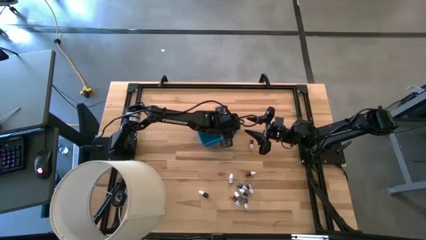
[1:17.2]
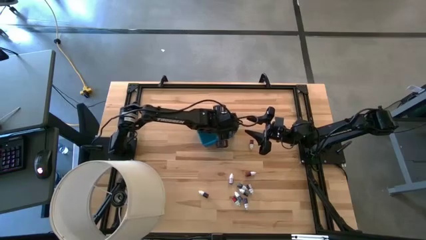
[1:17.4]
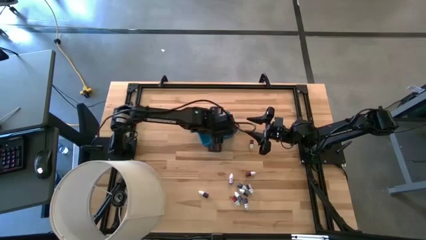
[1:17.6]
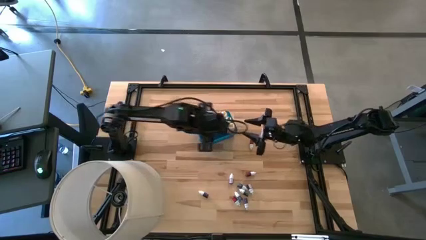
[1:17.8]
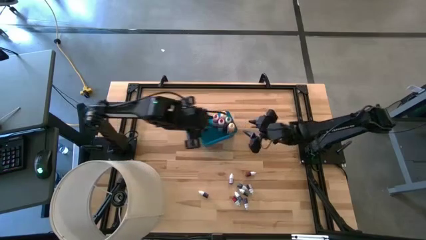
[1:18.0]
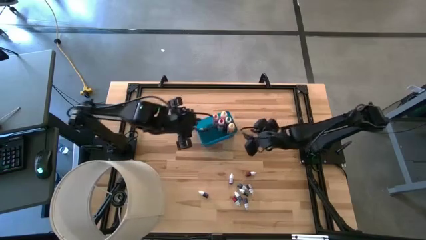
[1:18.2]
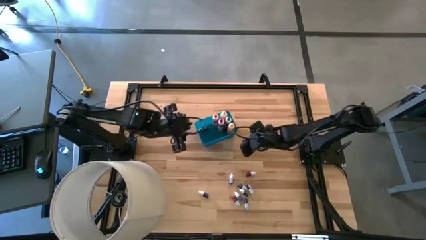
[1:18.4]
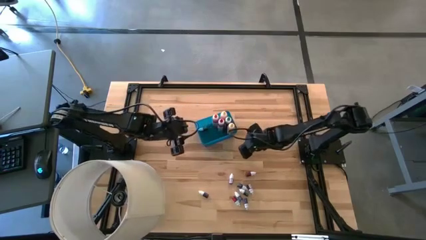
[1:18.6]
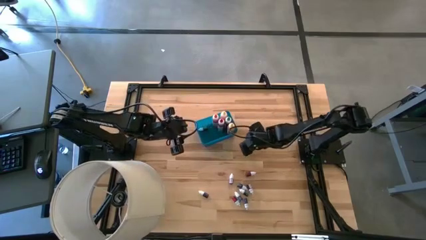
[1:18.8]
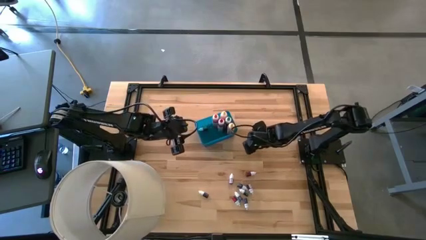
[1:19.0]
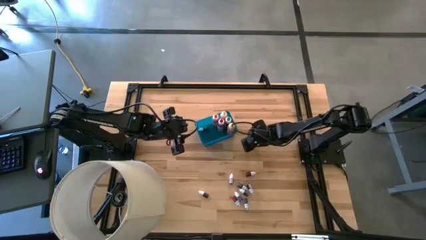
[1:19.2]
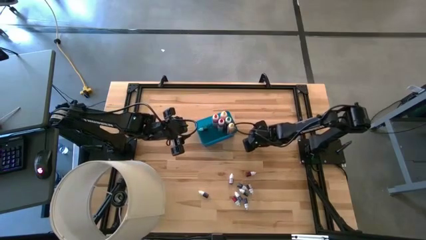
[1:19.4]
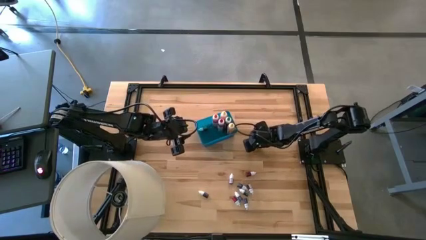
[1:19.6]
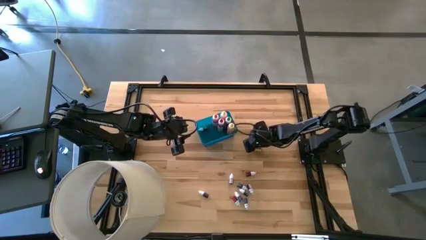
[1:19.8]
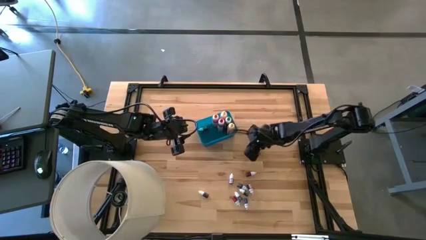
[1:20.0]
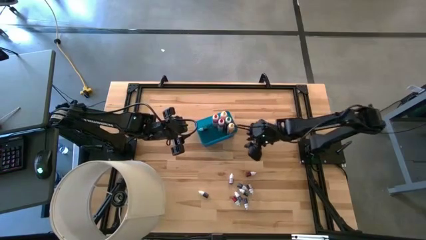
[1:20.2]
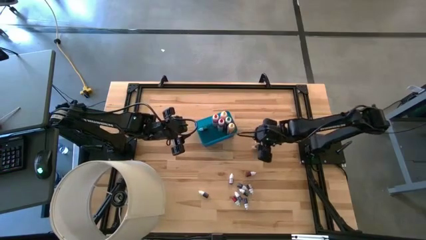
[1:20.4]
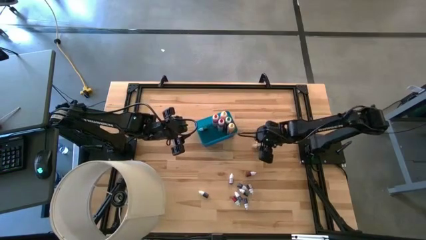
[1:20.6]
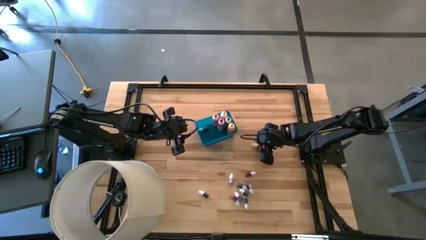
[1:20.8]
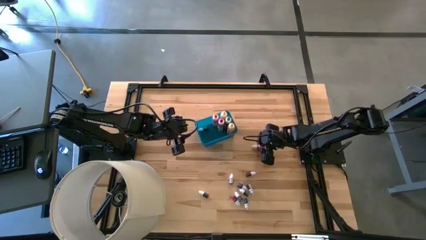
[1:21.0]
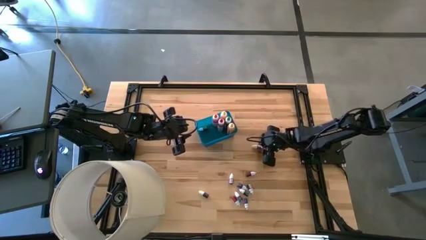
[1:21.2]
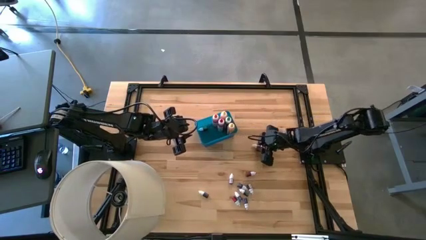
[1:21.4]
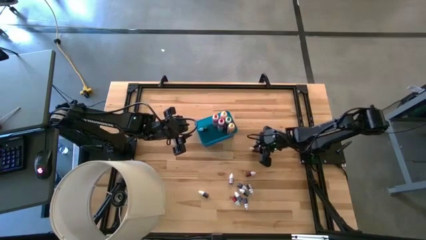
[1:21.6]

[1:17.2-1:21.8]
Task: Pick & Place food coloring
Put the top small red food coloring bottle into the bin

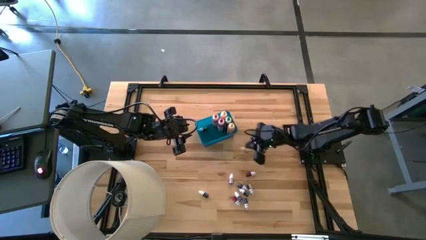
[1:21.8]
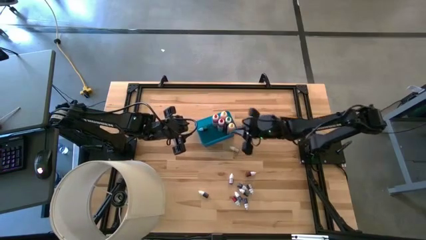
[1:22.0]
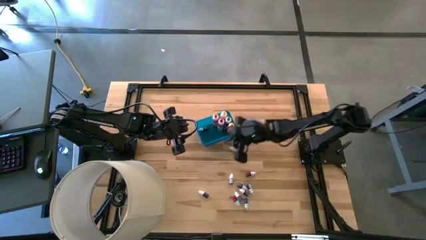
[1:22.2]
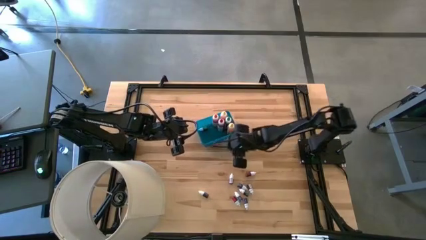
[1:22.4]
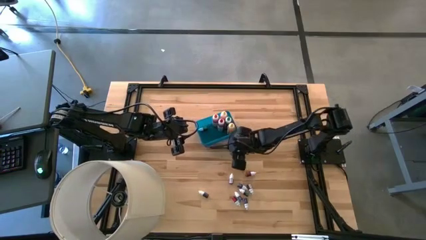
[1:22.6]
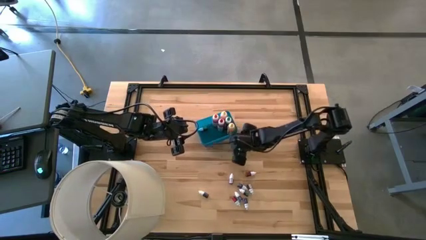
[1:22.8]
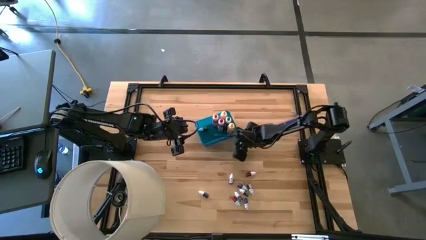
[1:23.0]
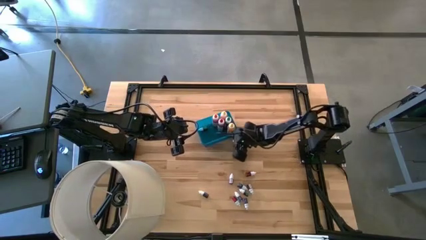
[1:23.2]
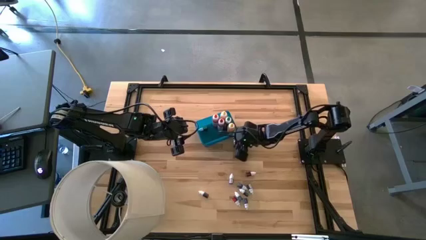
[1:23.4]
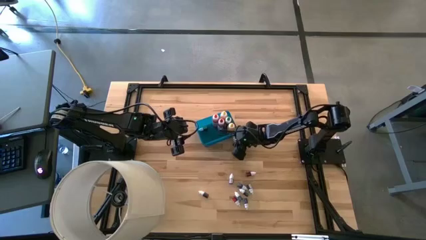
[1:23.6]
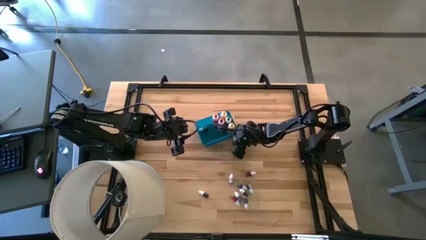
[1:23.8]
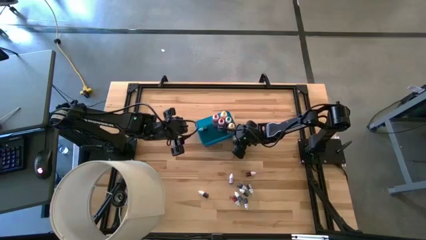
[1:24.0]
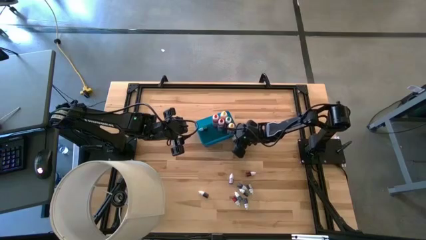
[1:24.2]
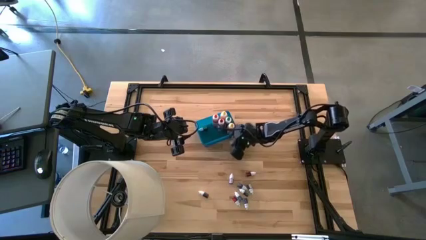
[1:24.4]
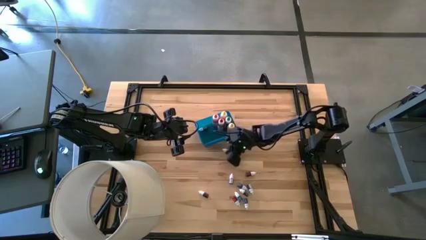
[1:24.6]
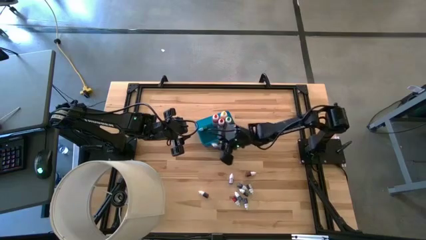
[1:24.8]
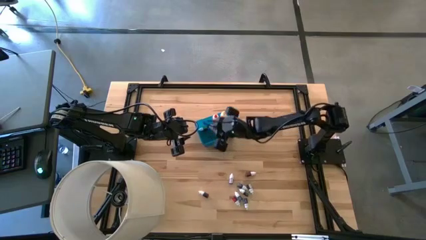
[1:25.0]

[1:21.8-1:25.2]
Put the top small red food coloring bottle into the bin

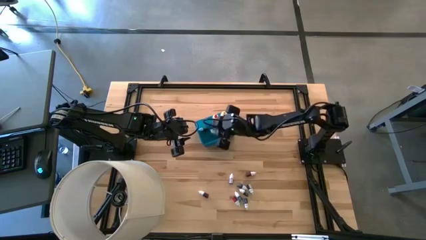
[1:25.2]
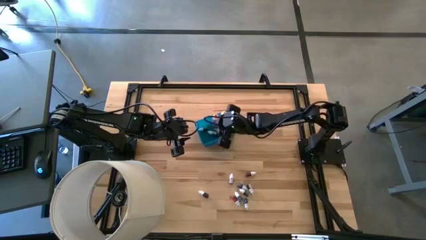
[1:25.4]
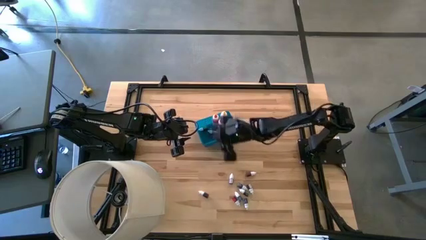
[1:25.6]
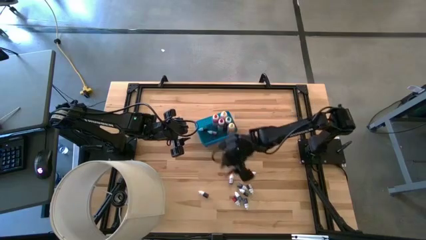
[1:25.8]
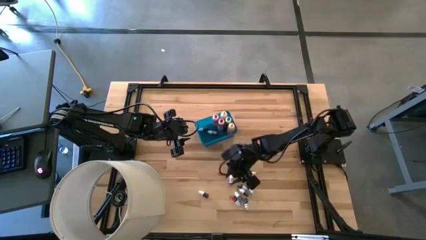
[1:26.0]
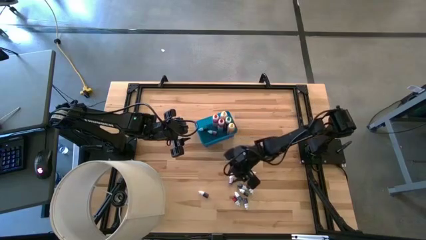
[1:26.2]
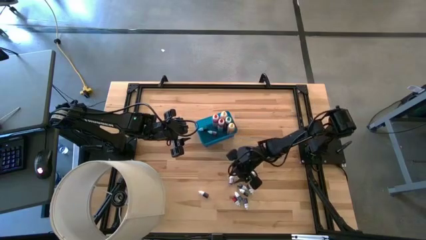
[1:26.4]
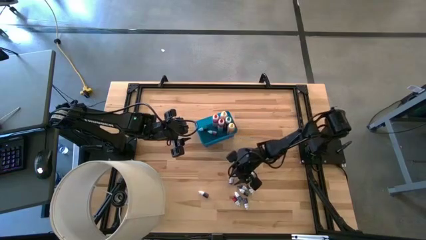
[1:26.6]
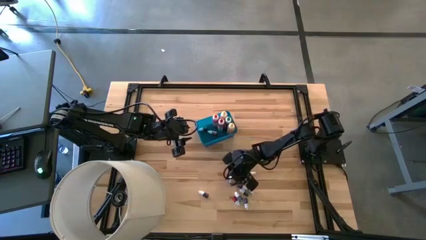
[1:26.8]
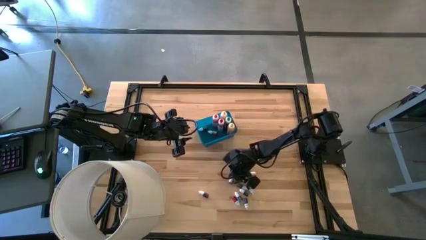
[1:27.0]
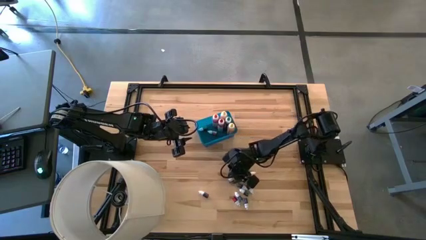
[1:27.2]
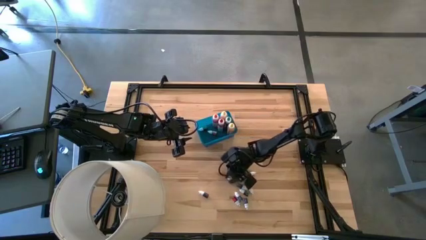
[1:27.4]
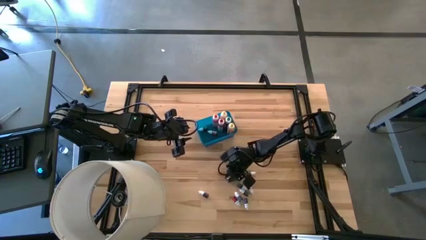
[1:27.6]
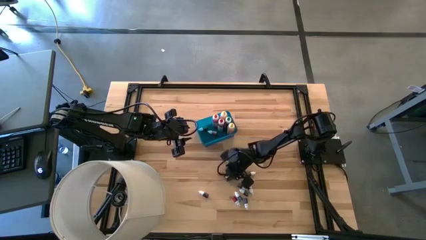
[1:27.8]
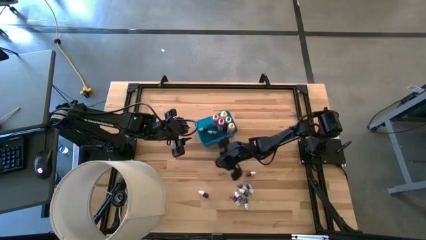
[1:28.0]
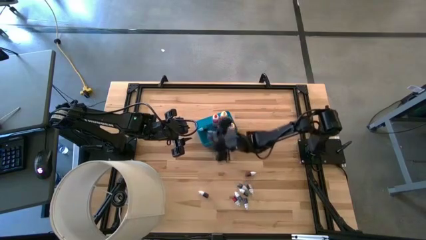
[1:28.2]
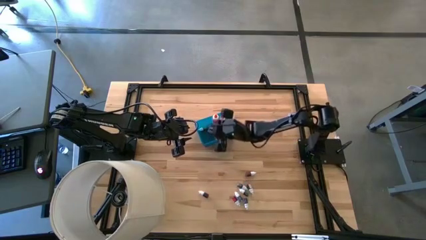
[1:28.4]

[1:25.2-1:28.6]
Put the top small purple food coloring bottle into the bin

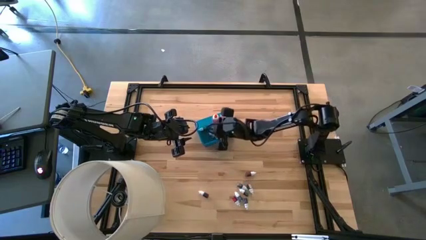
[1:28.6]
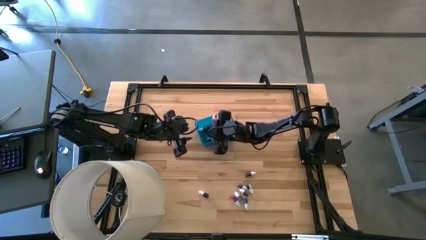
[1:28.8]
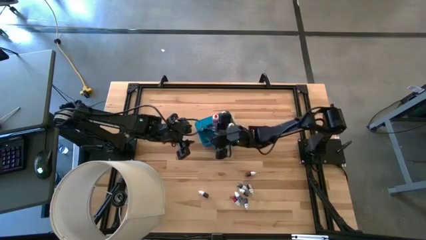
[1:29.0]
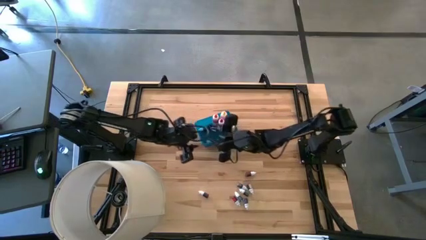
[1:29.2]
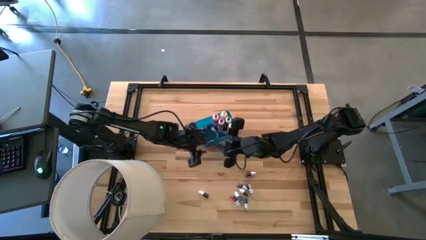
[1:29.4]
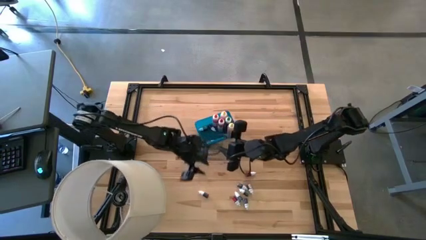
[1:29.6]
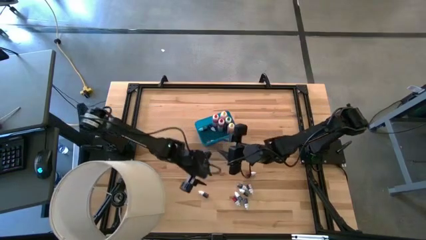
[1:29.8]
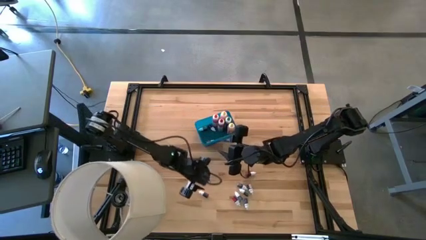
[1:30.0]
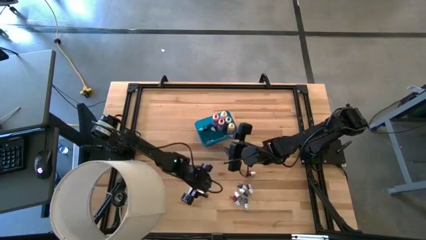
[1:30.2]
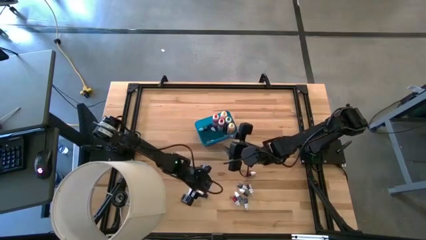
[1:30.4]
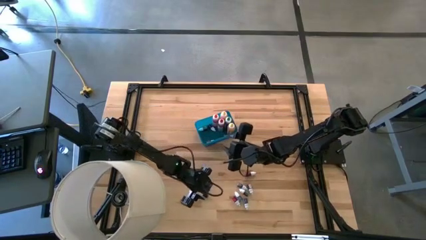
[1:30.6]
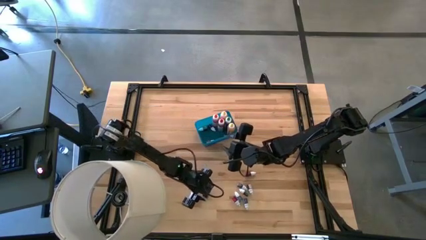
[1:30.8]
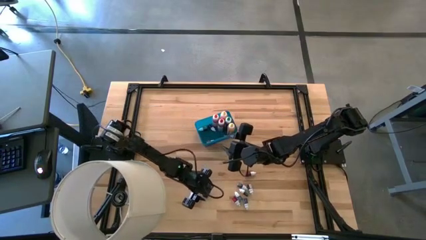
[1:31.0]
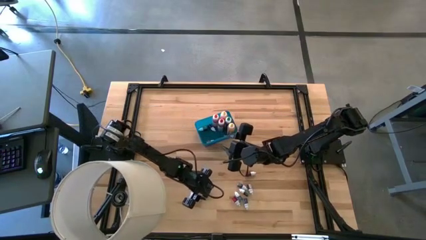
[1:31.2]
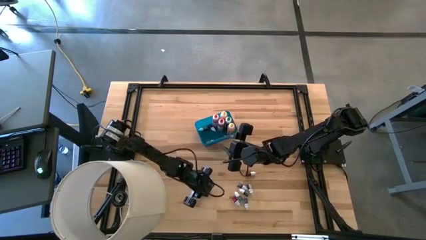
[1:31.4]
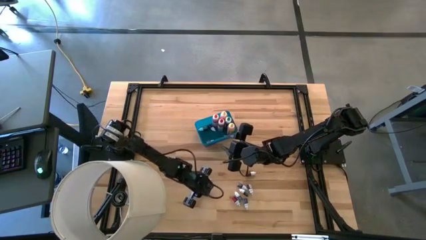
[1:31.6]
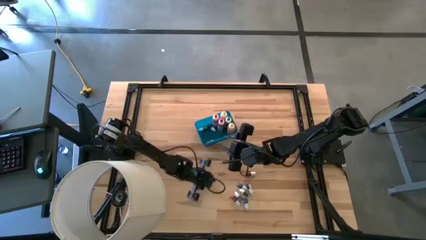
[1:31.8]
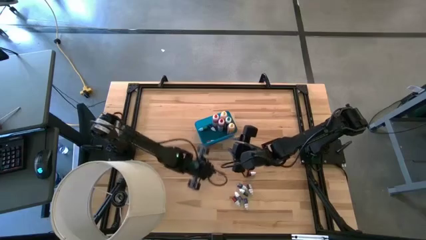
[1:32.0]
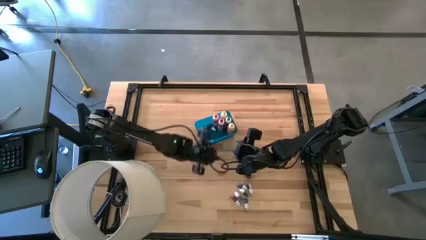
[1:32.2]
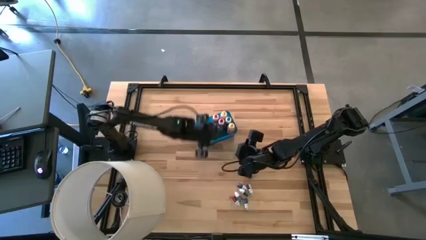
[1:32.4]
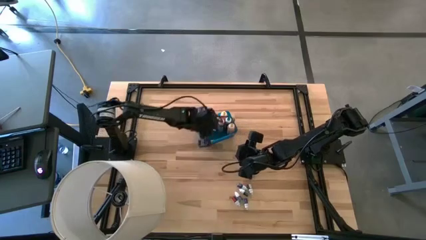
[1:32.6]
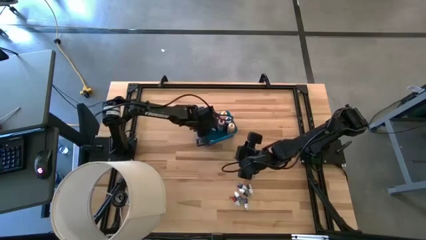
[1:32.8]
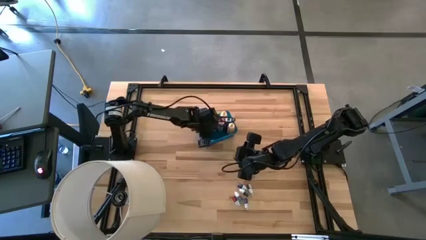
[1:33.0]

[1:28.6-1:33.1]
Put the small purple food coloring bottle into the bin

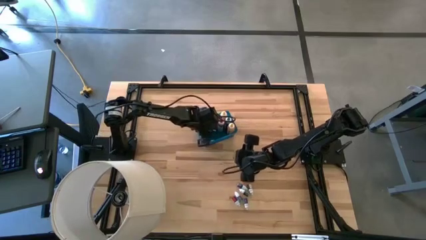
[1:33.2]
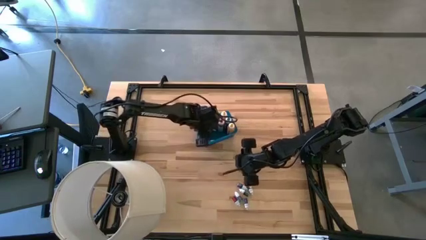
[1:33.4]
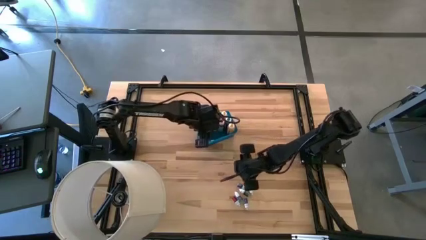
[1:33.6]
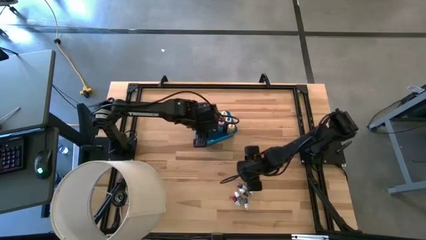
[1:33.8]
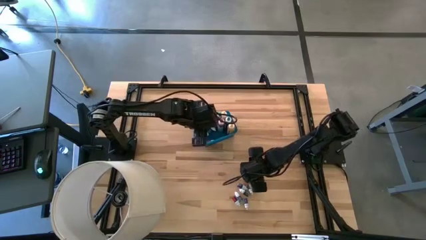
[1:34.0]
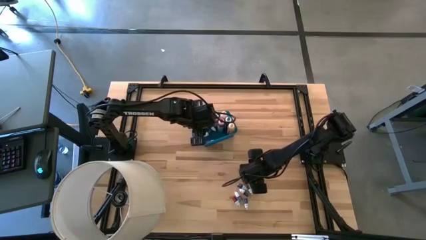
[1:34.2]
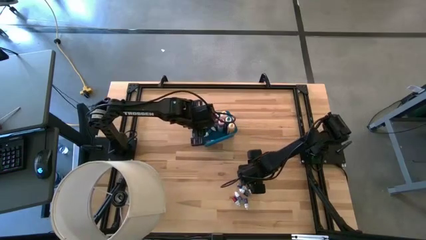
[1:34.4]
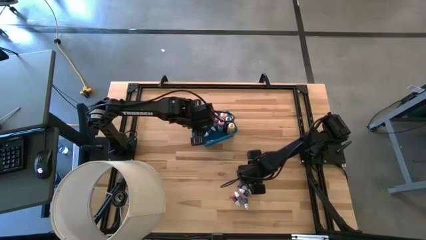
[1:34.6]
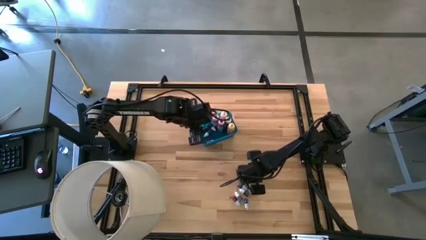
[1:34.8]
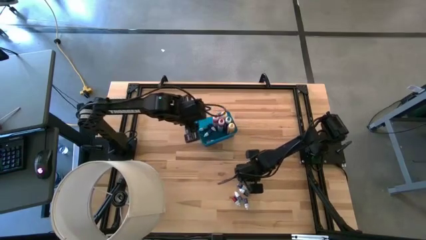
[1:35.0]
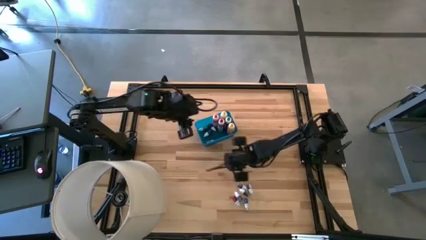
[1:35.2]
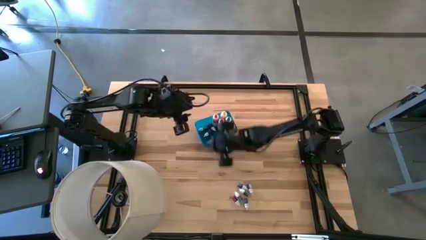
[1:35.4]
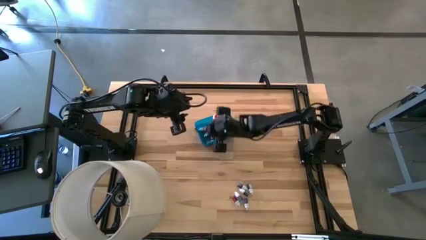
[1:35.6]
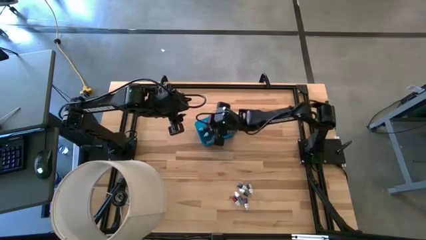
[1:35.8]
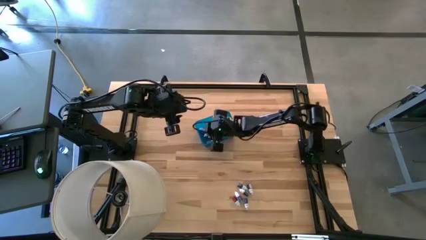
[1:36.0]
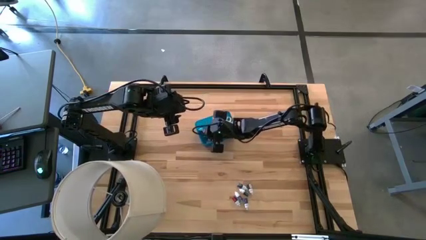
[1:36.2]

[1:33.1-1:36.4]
Put the top small red food coloring bottle into the bin
